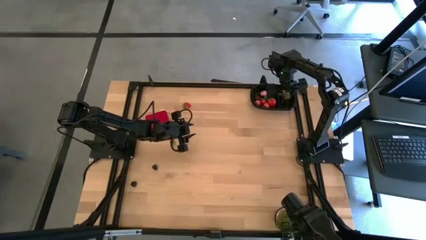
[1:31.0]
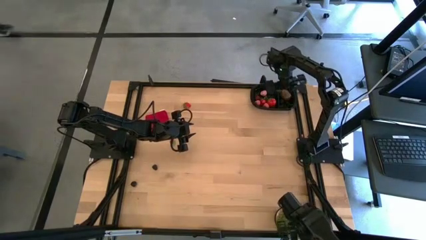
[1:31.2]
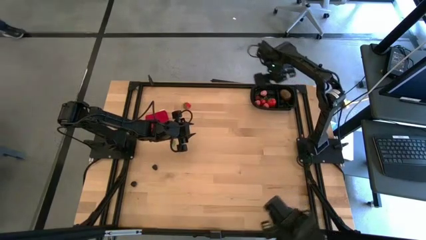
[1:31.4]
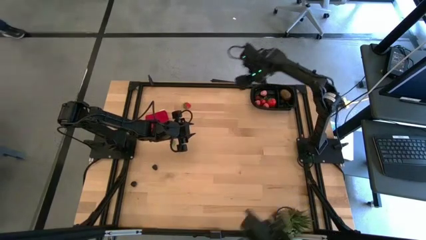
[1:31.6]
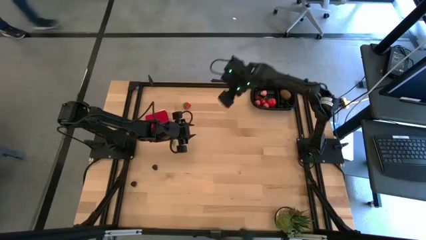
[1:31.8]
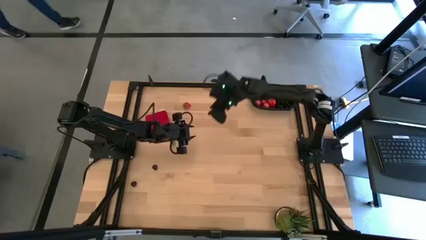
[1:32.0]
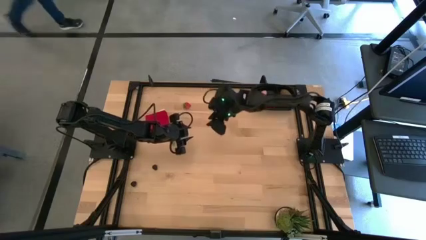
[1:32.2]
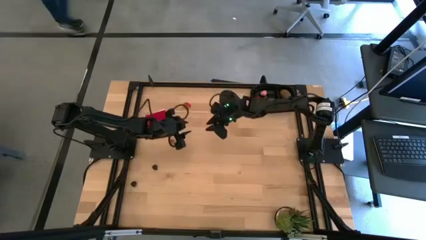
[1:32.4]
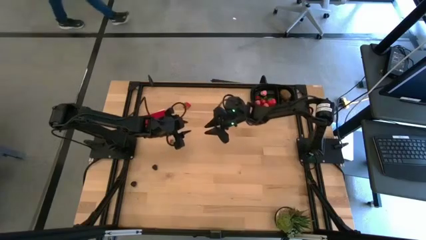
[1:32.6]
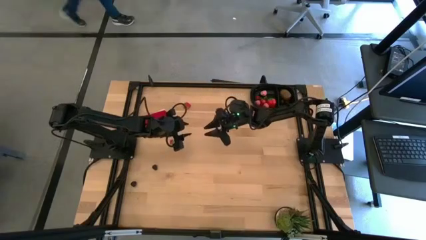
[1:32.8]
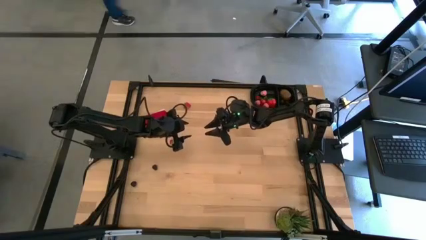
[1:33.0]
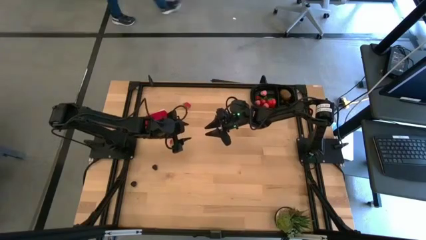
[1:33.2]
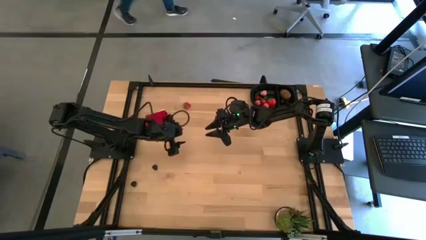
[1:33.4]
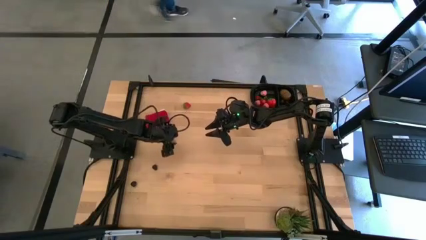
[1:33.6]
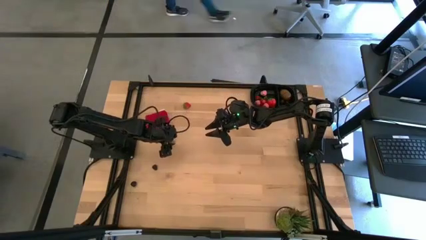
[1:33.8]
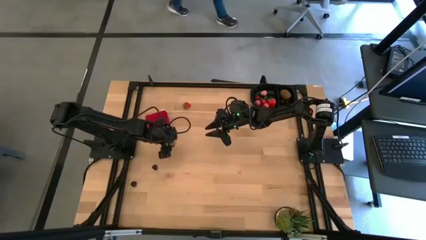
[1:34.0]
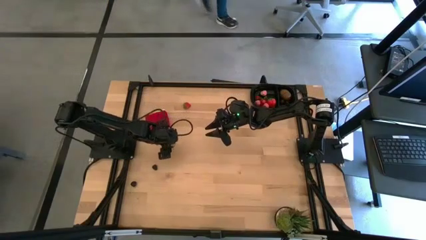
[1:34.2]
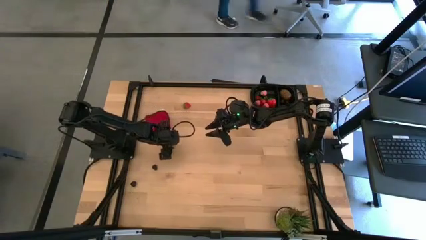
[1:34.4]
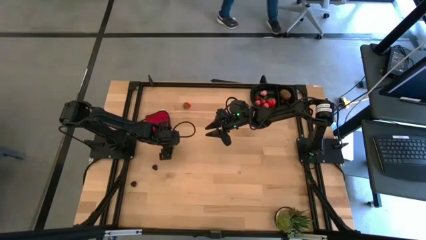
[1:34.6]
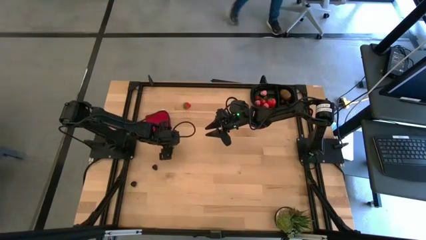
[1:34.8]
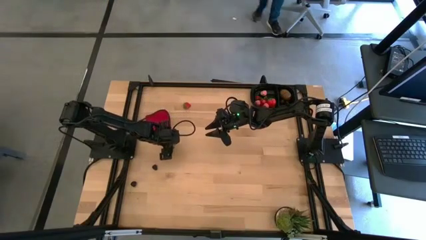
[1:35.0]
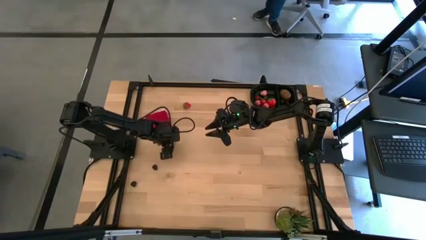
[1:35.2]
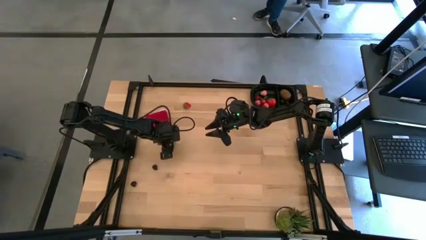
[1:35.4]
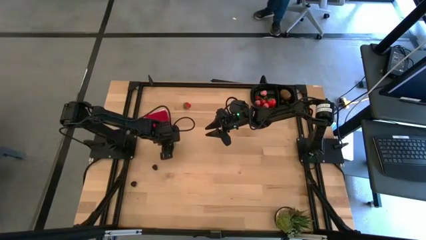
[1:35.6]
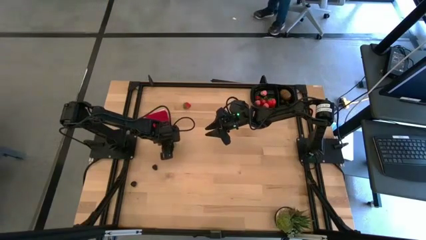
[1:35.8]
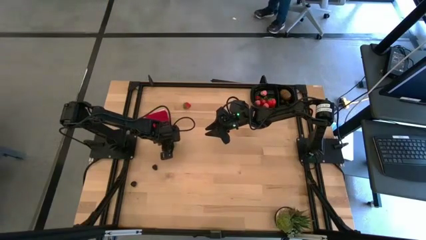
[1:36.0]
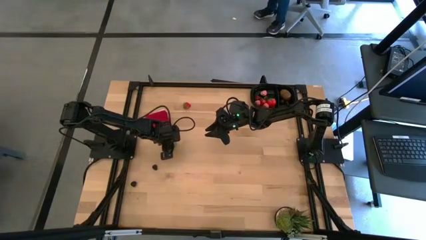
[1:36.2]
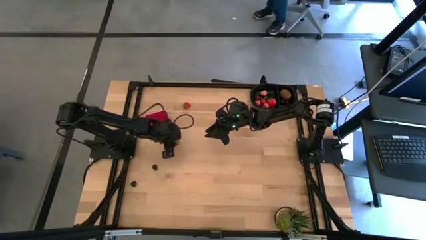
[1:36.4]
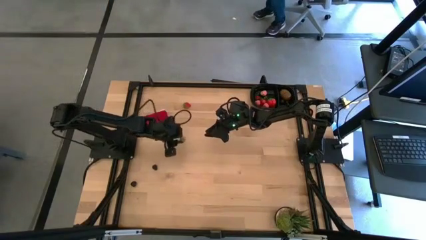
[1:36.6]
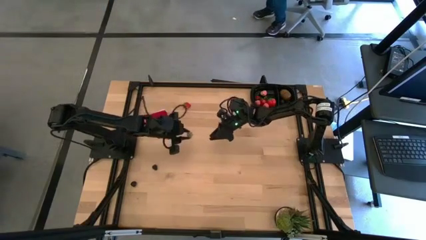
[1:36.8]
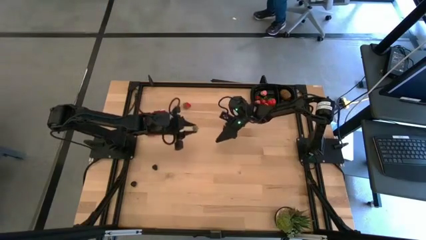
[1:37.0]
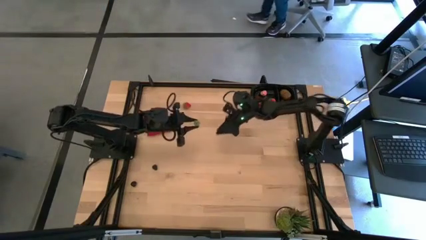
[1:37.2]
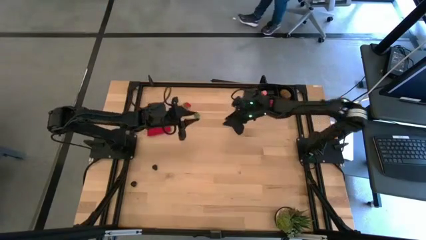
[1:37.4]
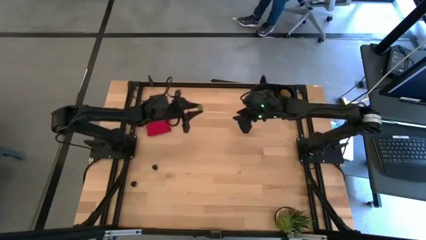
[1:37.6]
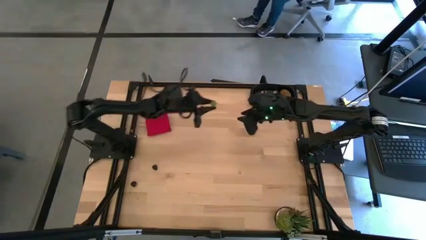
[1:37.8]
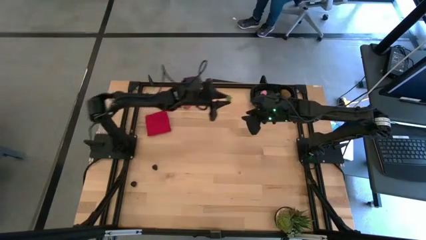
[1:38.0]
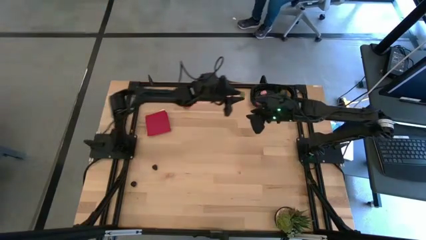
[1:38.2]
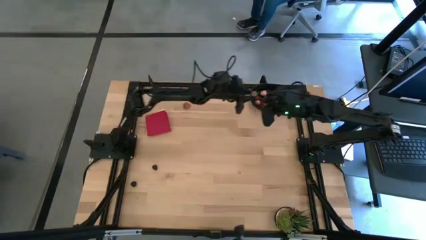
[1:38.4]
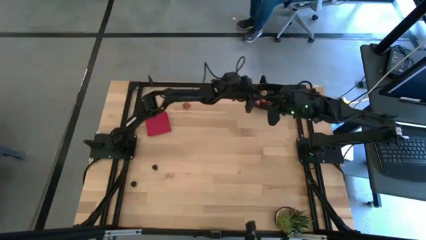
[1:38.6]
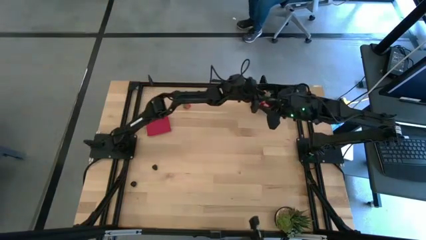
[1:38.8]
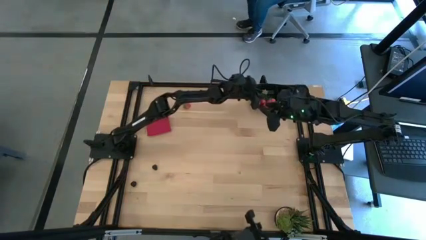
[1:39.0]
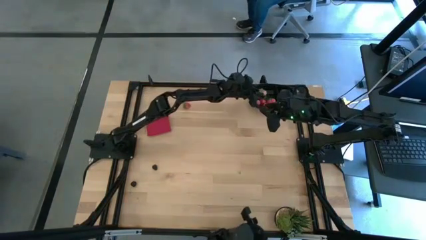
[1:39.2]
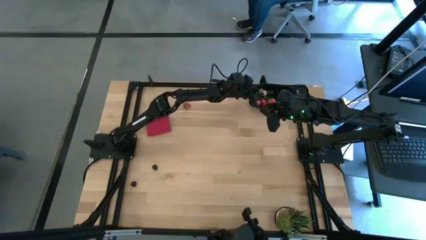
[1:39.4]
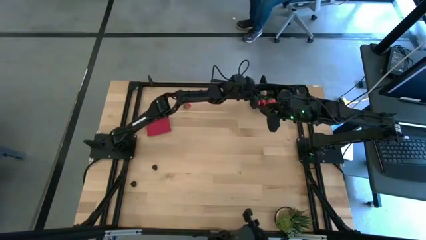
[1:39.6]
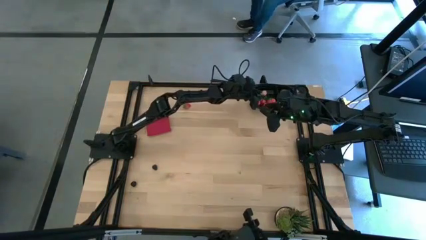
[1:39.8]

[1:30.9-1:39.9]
Task: Pick and placing Produce into tupperware
Put the red strawberry into the black bin

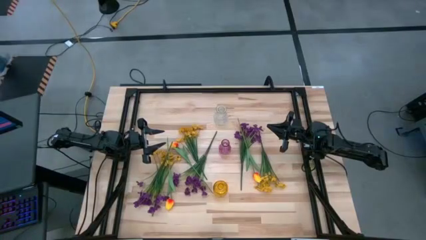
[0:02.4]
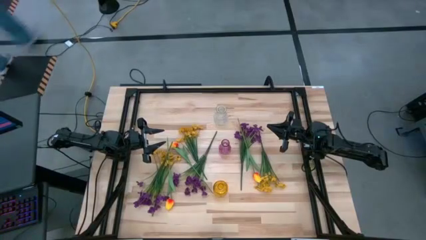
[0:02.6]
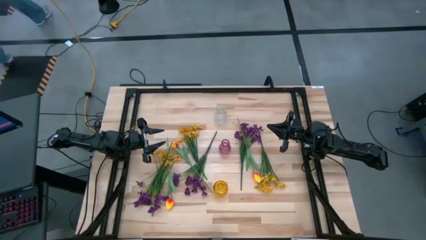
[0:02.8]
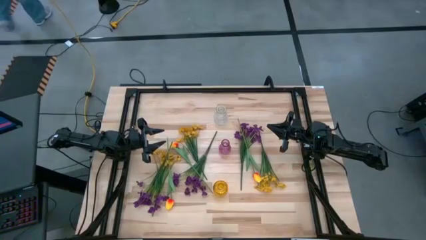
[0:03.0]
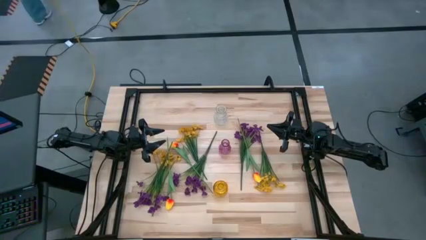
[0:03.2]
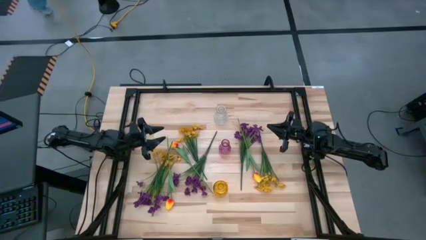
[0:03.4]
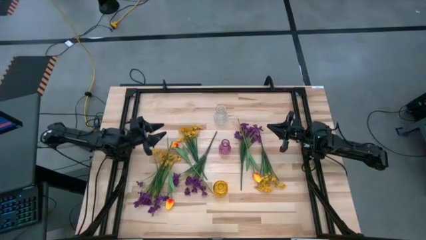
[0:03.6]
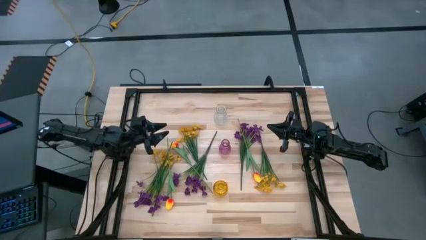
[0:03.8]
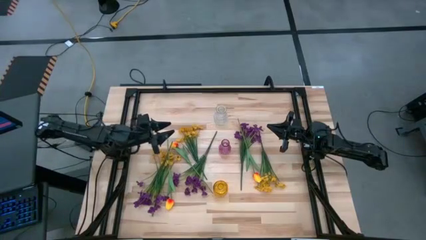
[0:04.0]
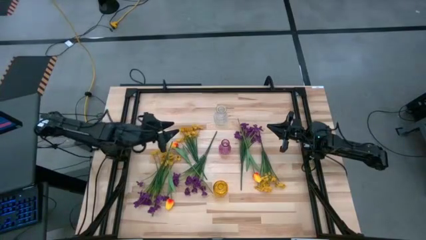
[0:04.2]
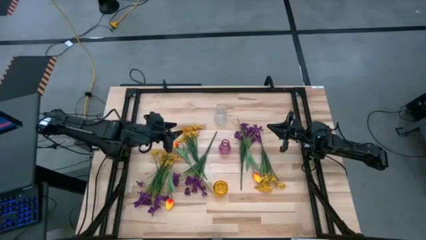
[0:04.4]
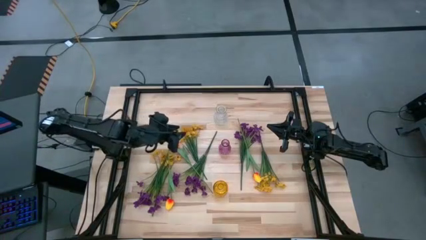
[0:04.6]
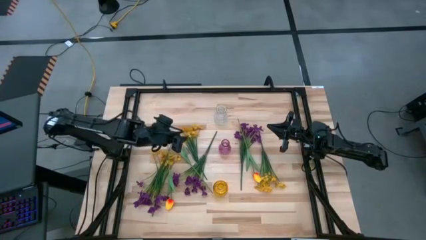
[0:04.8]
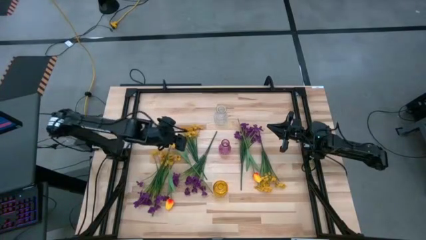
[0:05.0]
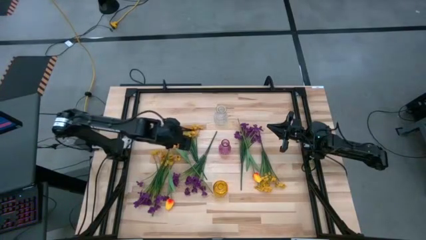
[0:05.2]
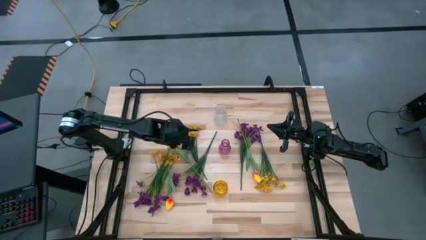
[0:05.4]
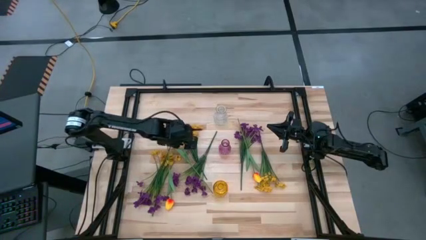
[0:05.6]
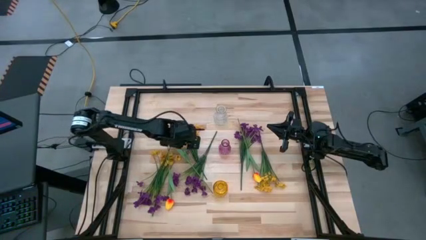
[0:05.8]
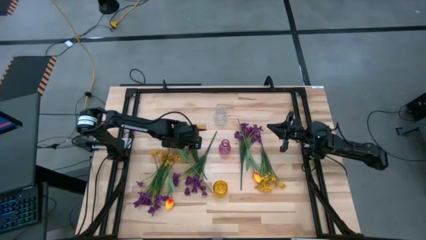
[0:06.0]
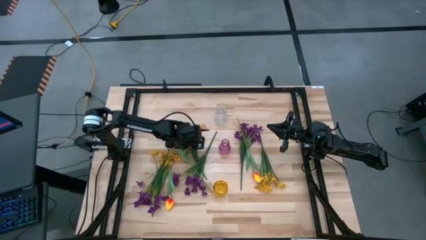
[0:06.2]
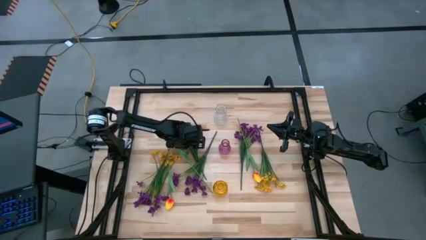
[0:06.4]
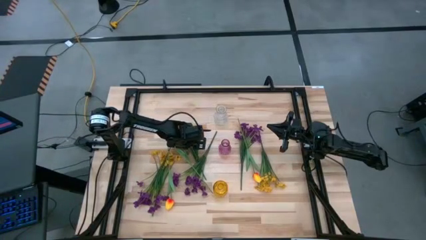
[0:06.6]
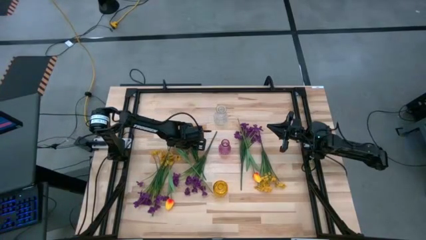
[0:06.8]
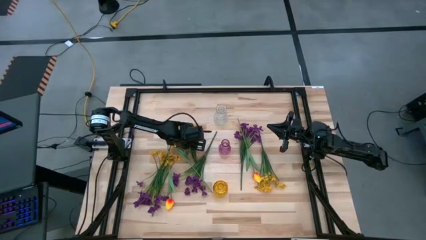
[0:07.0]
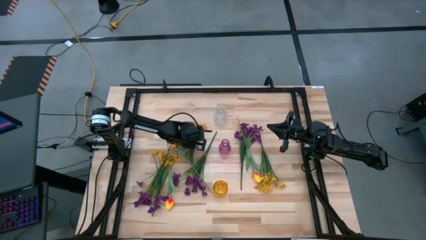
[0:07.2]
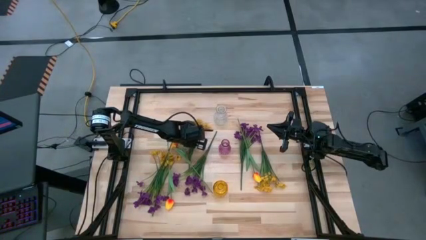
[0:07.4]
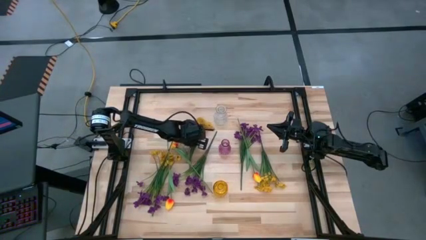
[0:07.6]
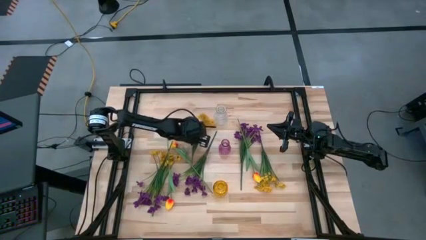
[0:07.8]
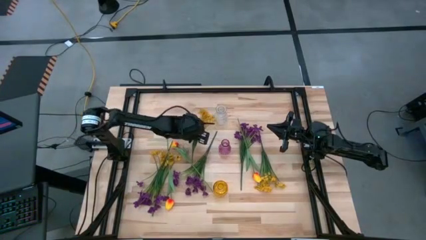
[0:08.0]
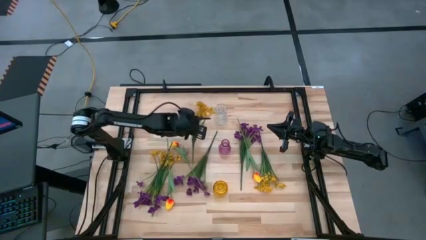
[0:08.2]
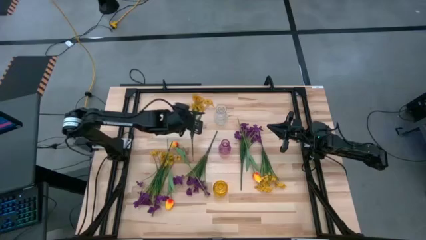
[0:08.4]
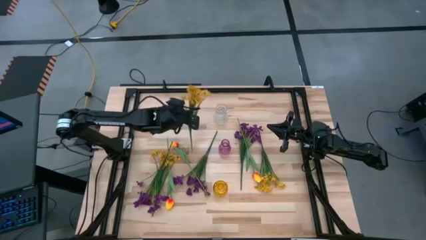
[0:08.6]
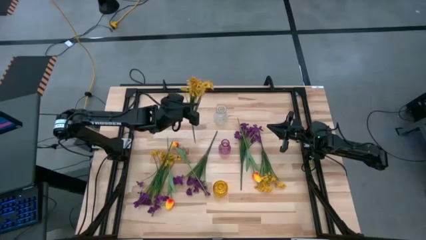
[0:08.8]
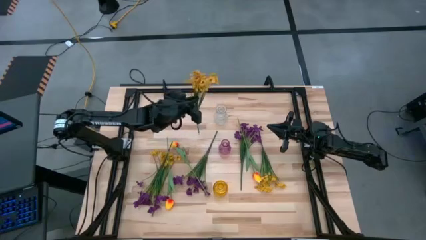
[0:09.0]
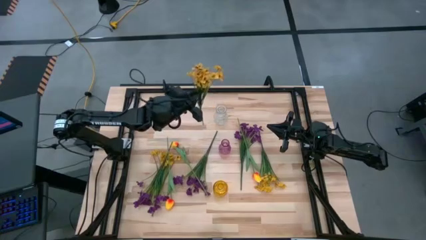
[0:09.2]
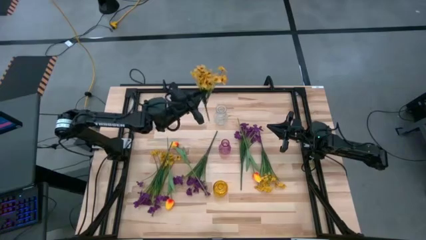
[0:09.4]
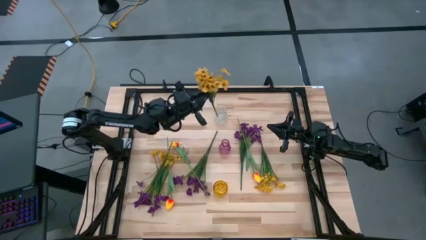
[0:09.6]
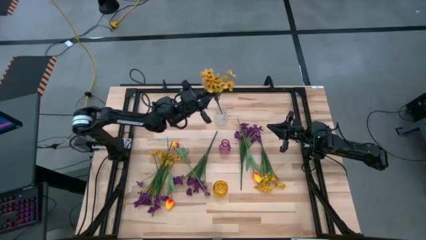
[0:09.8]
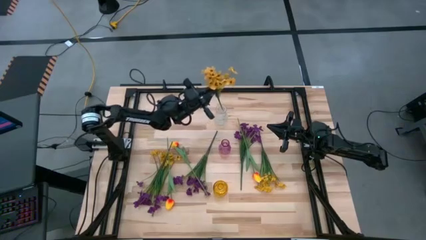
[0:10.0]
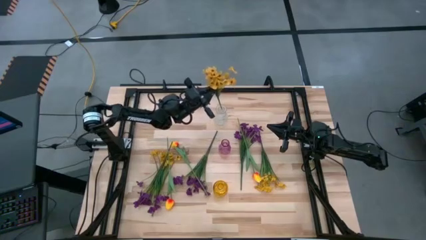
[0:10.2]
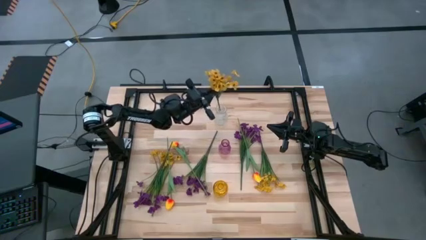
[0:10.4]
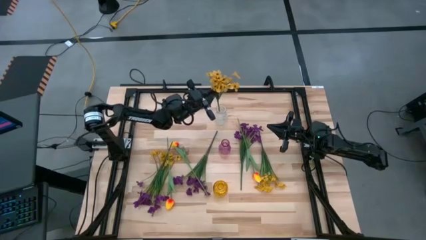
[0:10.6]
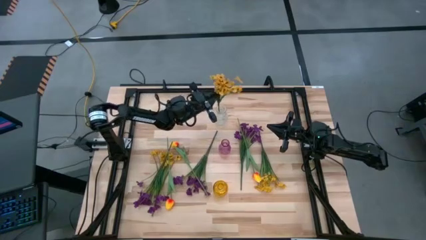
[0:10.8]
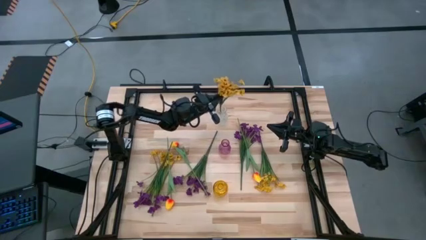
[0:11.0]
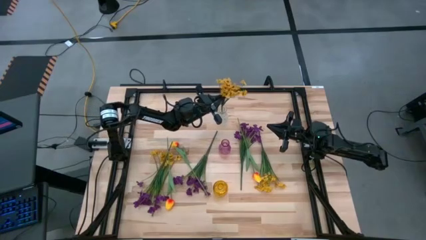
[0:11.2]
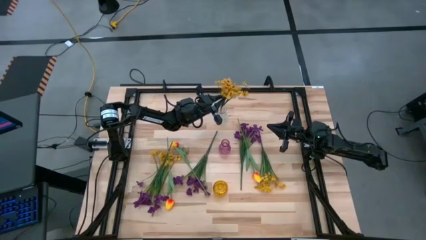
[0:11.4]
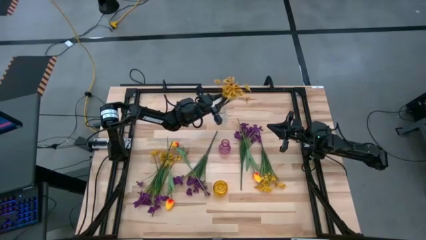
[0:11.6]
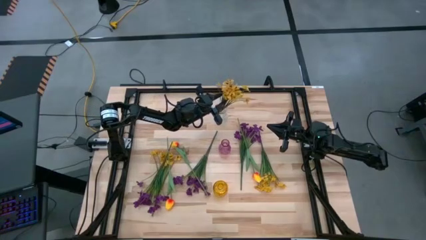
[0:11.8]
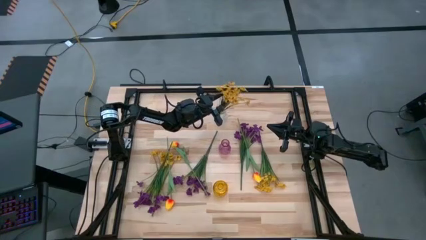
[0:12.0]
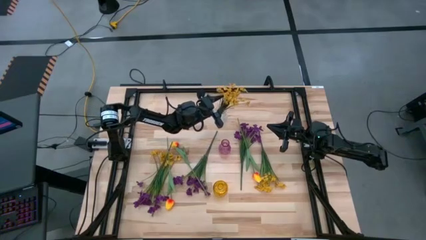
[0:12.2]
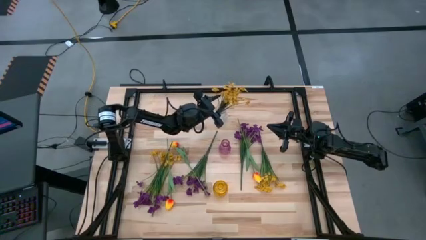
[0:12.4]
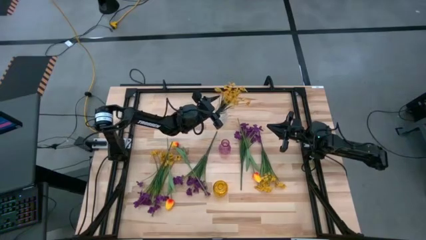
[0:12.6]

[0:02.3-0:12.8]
Task: Sort flowers into vase by color
Put the middle yellow flowers into the transparent vase
